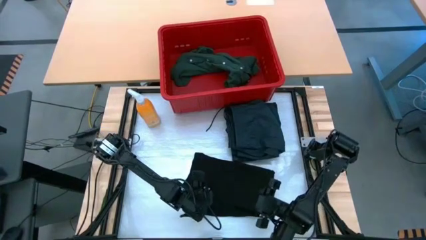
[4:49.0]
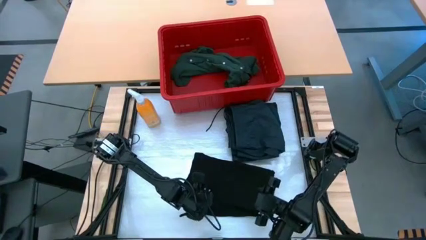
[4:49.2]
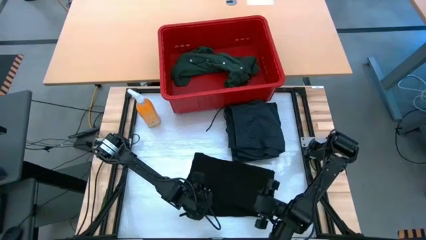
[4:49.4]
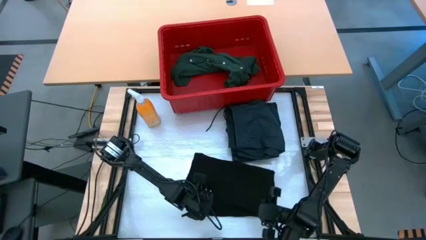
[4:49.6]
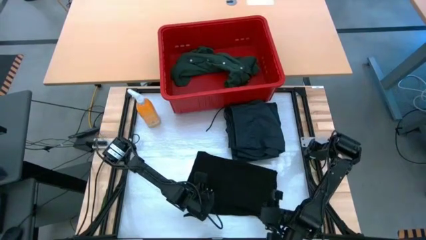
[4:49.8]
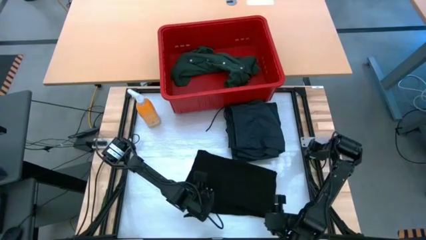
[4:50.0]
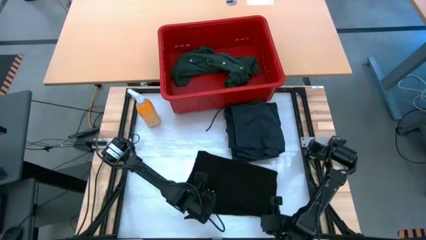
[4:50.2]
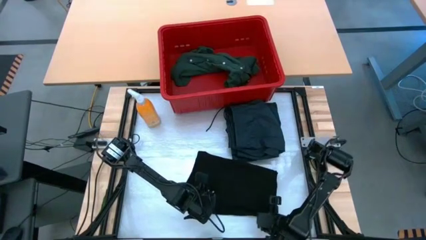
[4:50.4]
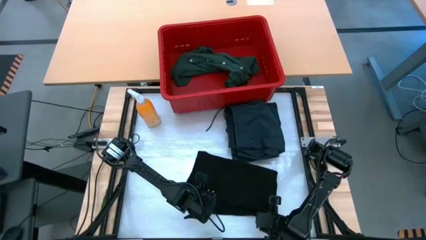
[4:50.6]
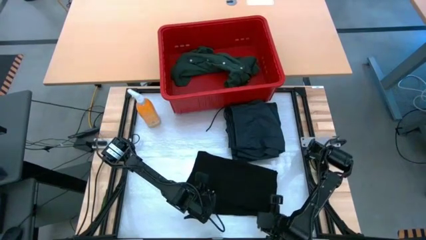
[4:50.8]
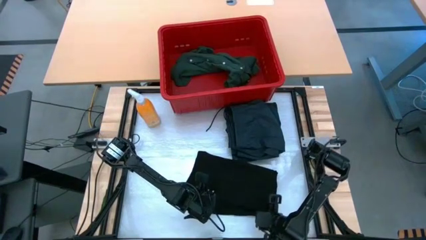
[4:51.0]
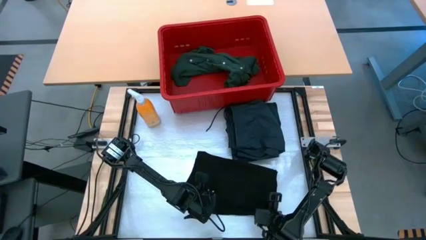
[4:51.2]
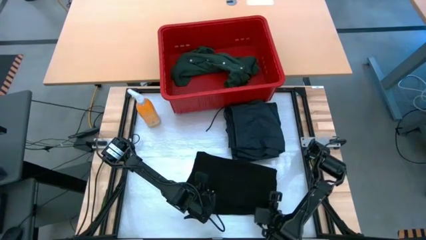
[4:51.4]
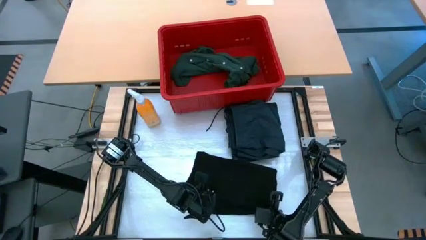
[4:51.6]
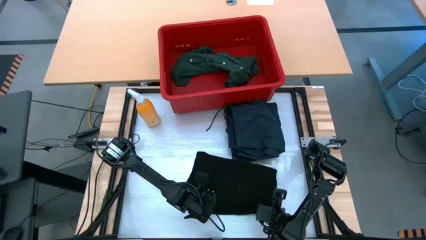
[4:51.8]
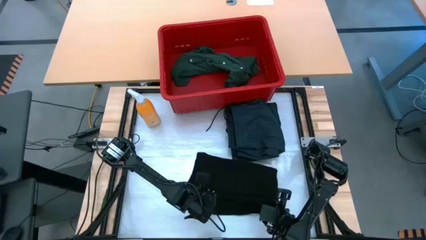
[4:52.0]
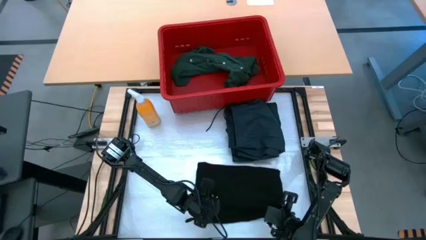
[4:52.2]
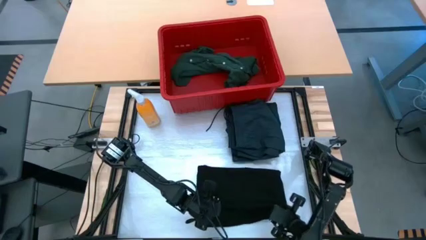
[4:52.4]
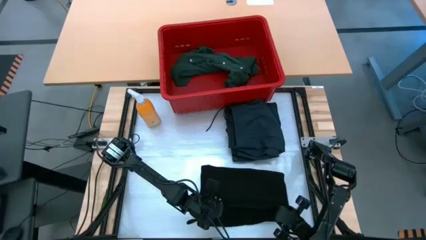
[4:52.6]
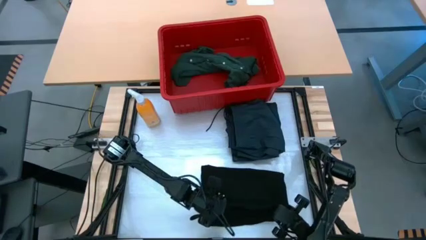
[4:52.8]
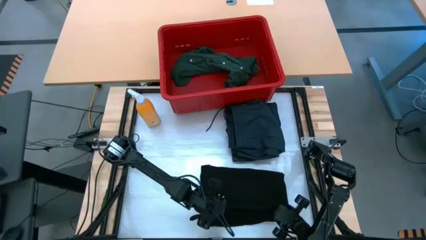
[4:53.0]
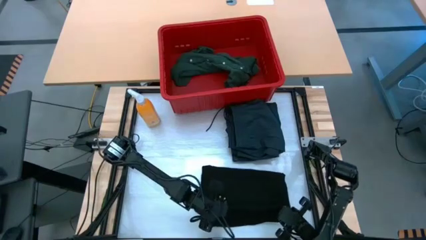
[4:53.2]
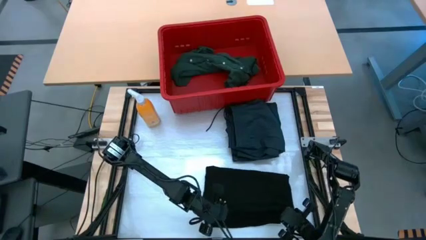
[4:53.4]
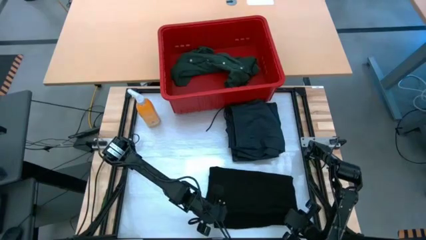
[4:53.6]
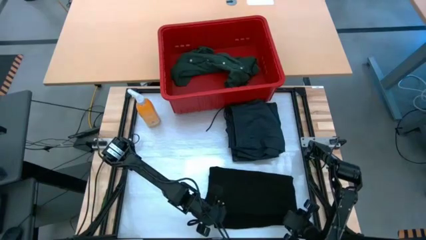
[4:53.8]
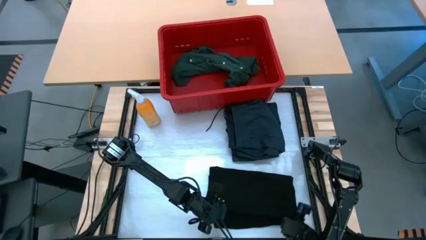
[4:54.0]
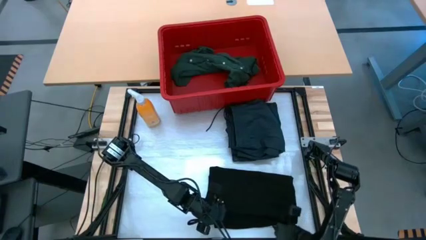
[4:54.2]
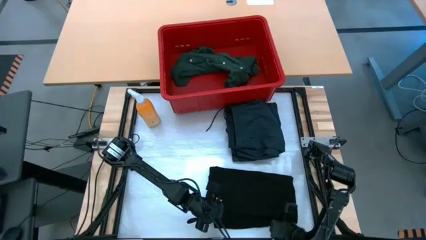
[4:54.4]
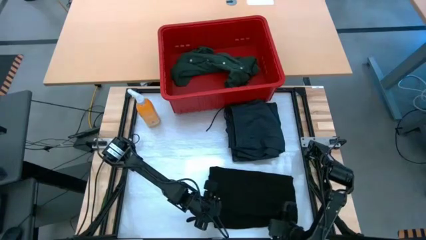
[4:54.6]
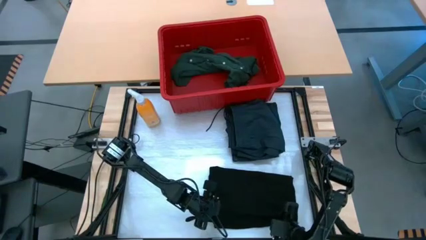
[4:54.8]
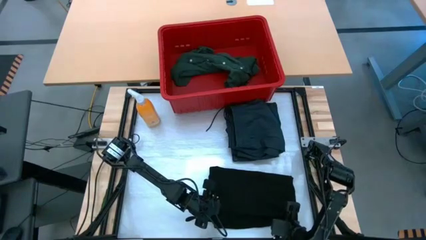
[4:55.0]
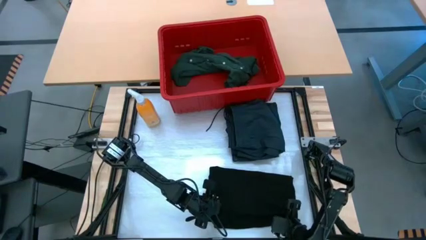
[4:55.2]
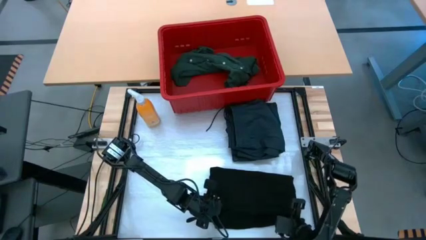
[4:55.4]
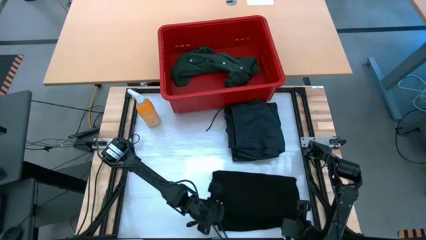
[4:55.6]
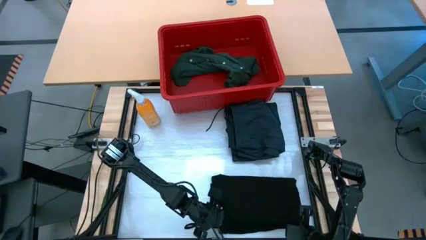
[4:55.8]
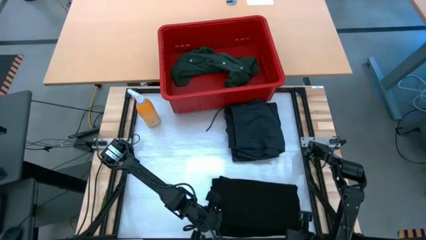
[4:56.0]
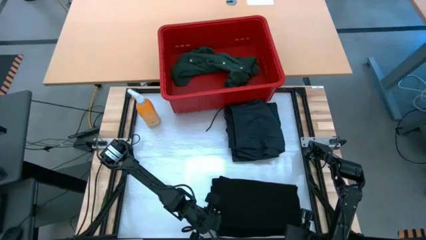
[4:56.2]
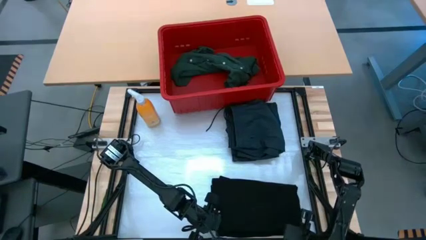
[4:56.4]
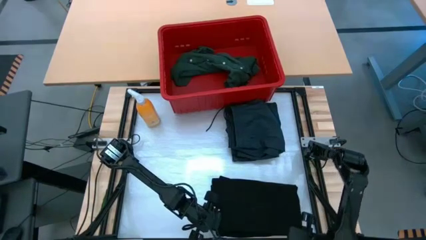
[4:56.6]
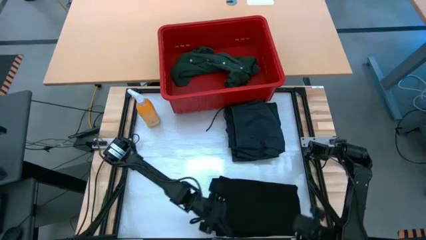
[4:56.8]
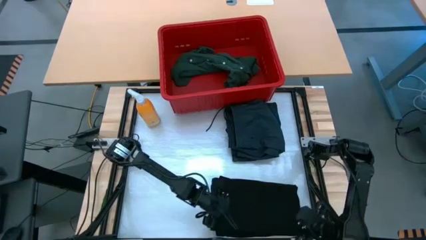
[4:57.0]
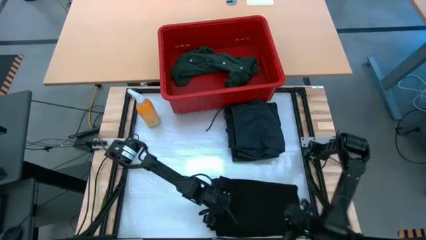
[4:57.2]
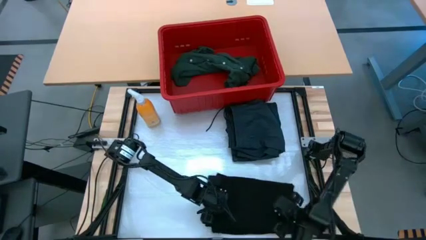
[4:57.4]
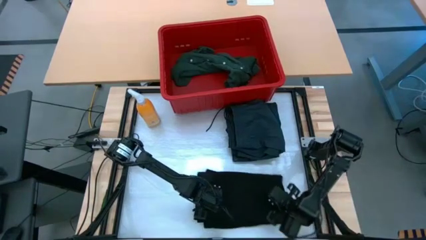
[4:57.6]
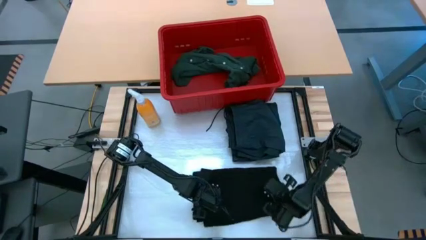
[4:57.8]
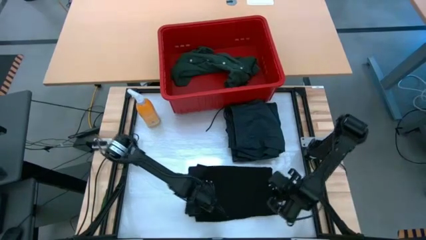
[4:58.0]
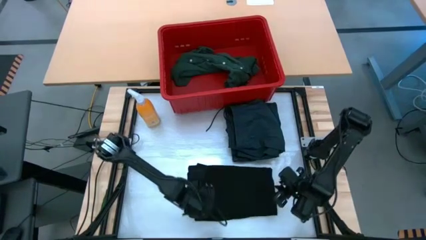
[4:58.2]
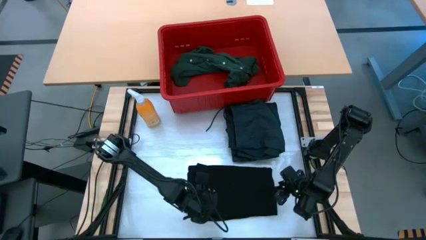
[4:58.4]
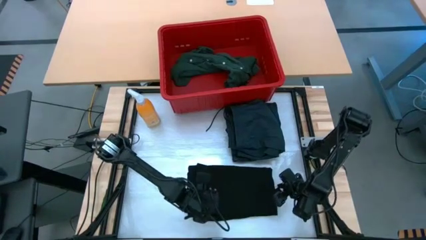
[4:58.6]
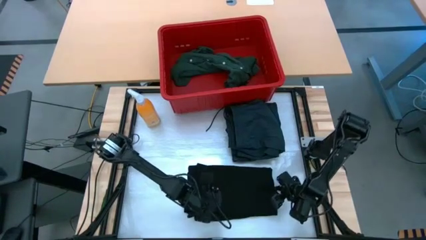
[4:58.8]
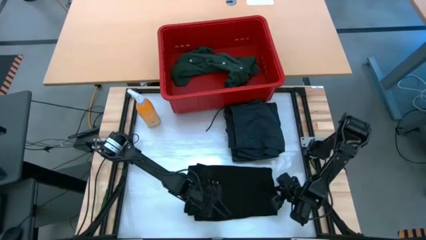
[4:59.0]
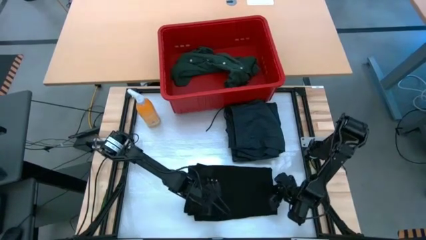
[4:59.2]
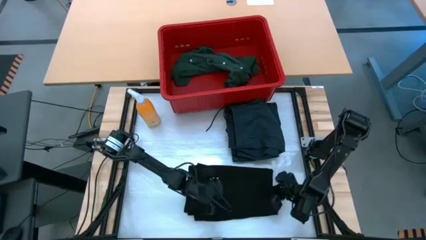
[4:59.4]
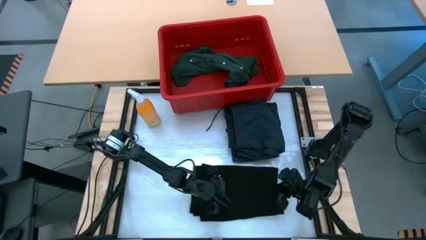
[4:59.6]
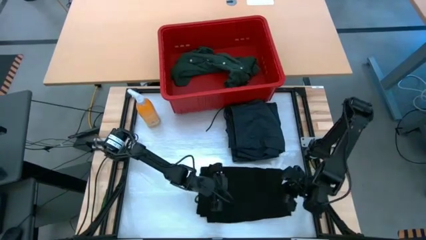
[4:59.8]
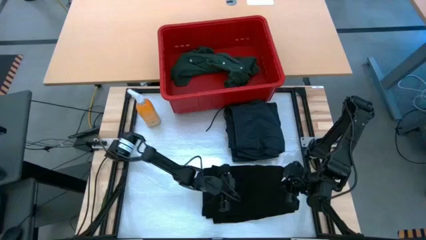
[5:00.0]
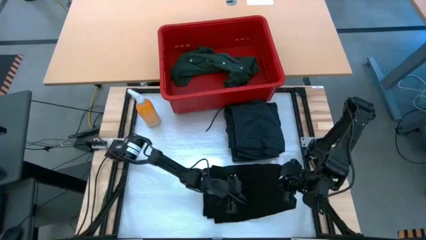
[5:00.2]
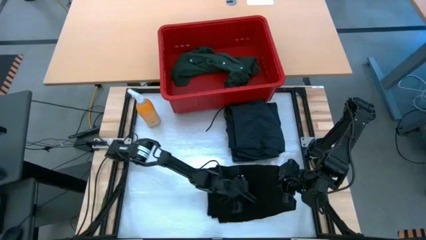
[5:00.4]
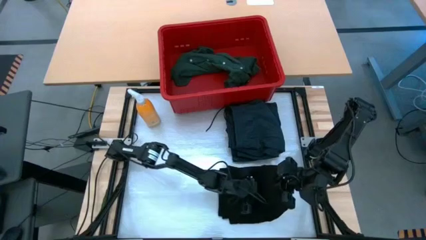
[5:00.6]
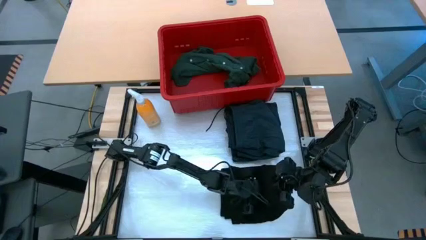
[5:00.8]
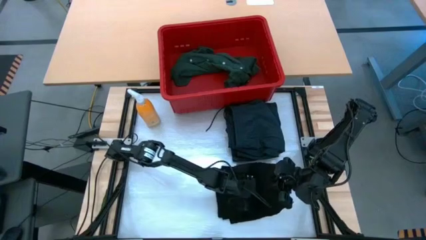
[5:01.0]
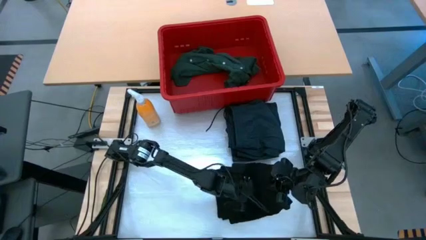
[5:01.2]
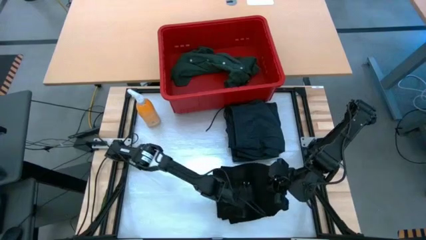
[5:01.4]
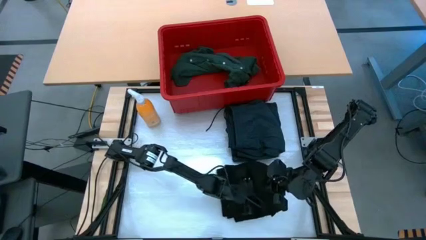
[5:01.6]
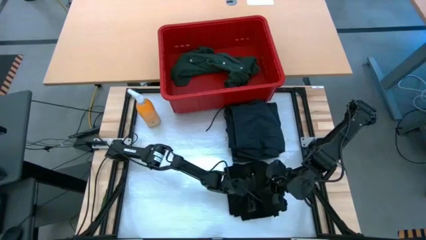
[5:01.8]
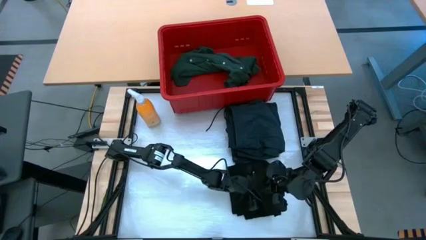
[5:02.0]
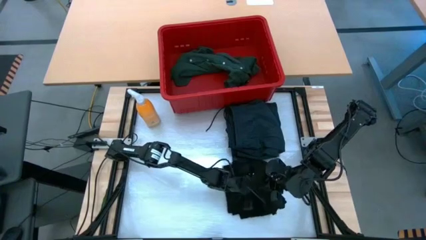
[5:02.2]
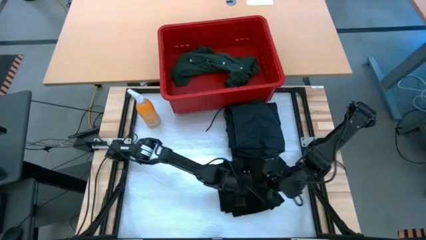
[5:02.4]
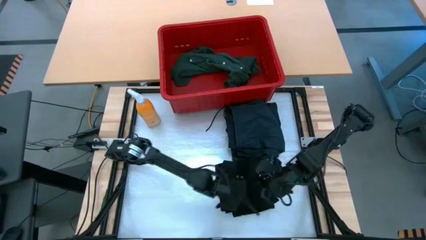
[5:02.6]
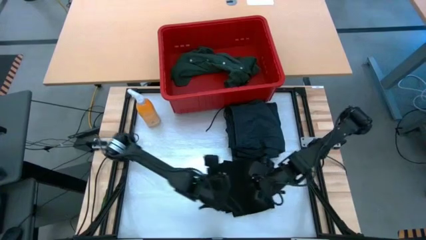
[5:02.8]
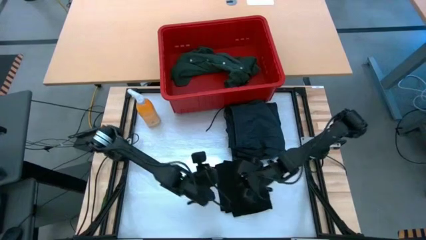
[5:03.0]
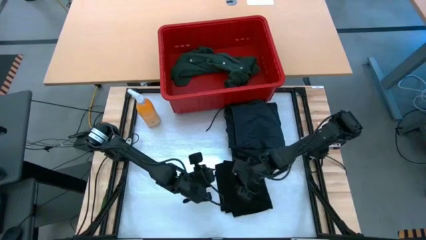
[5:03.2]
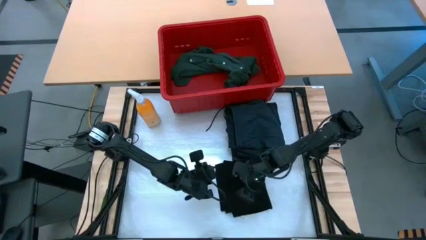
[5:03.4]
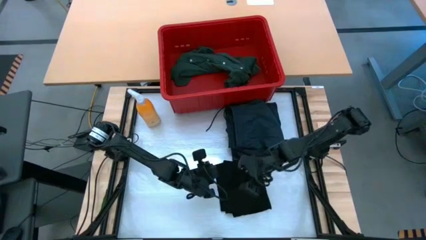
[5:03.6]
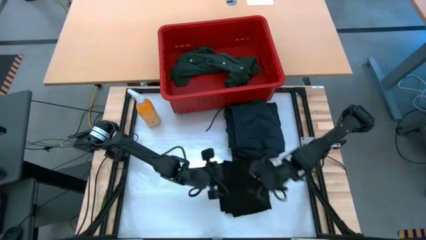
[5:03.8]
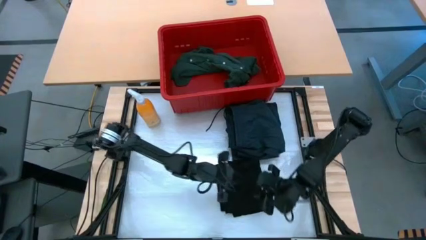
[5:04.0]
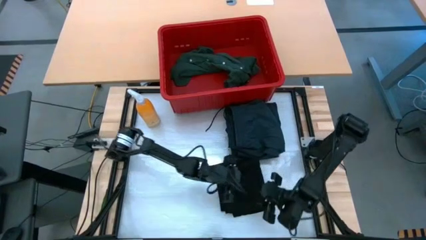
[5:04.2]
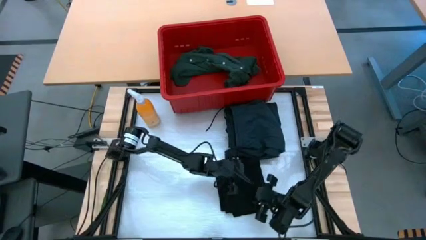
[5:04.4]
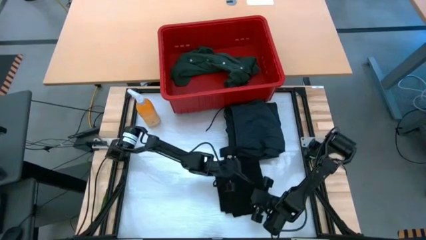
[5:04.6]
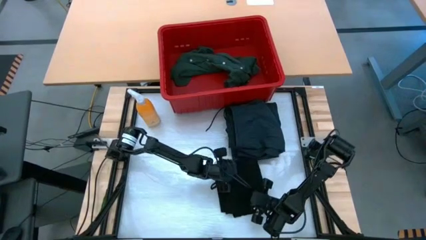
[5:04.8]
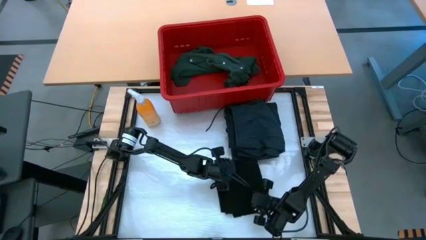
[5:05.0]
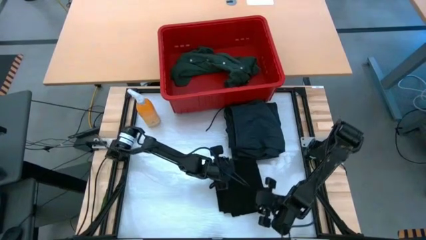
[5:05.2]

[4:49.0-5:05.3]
Task: Fold Laundry from Bin
Fold the black shirt
